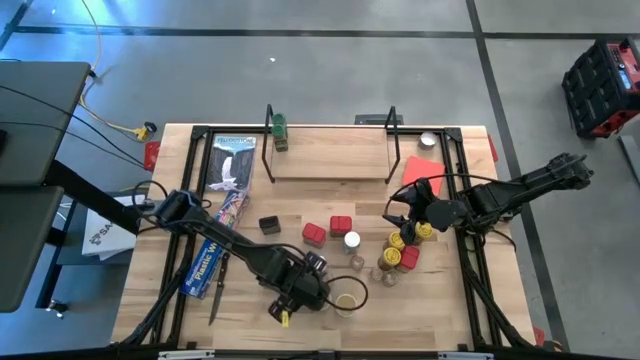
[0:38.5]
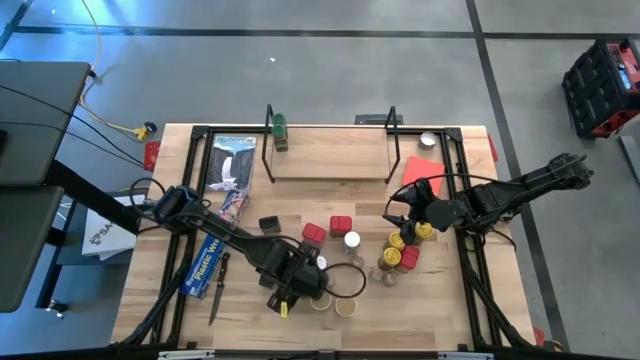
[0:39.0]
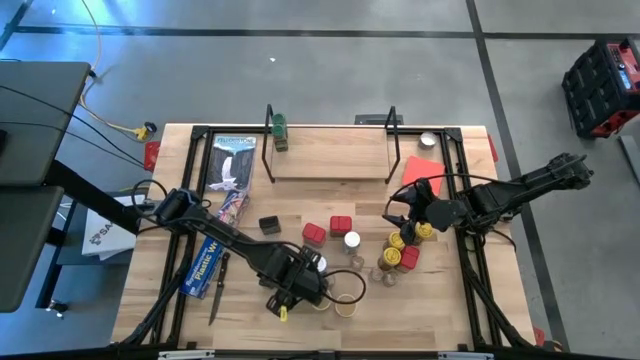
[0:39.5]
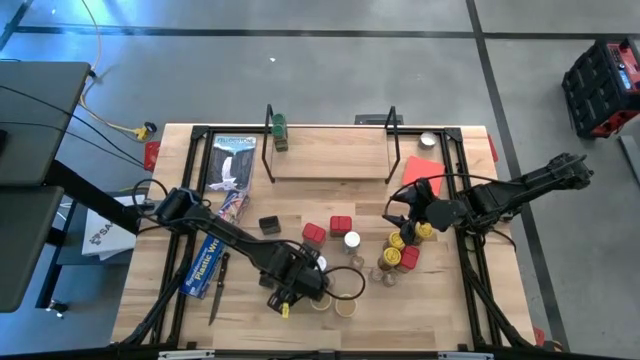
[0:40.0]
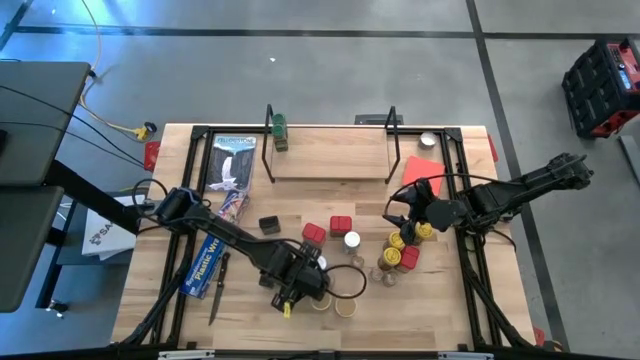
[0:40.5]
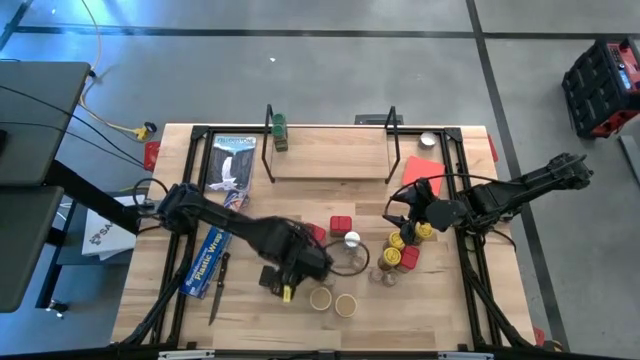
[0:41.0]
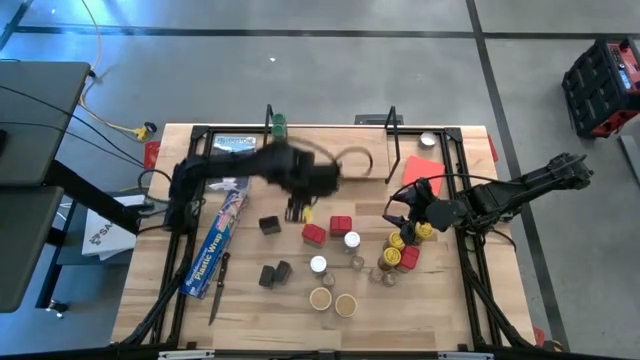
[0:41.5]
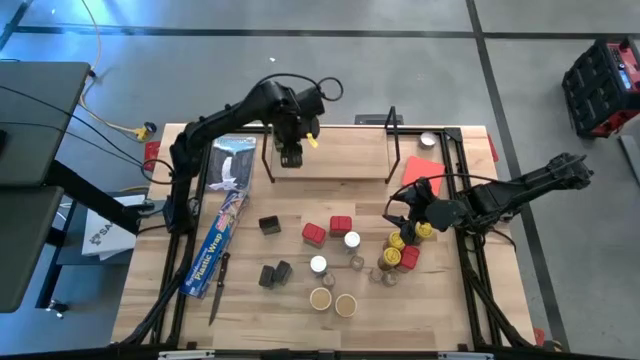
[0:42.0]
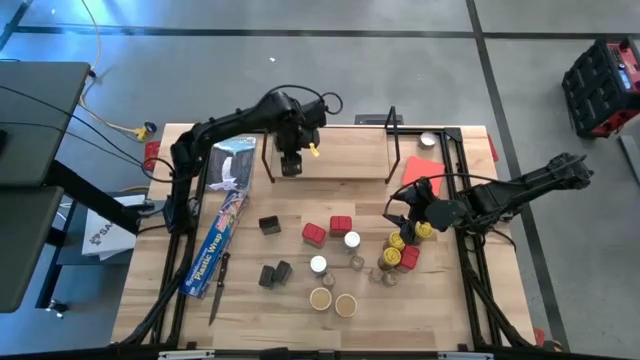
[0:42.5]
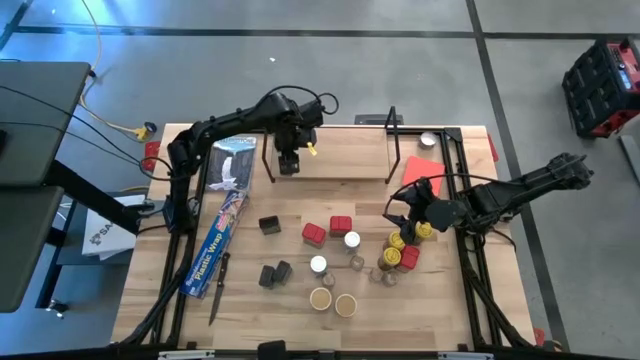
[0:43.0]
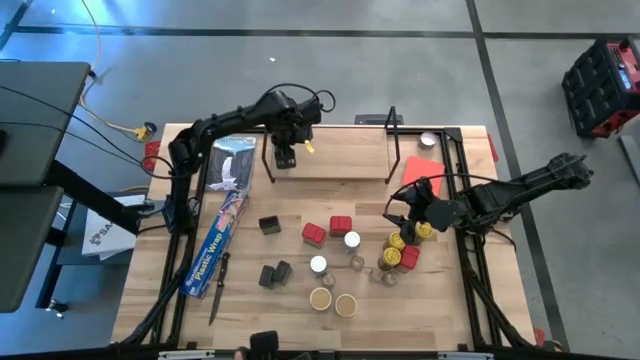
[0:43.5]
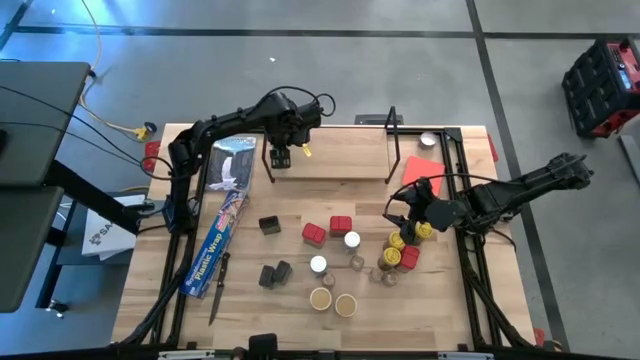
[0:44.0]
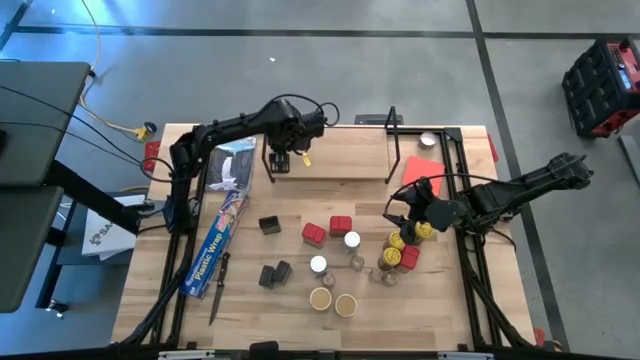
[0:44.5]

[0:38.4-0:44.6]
Task: Shelf spices
Put the green seasoning bottle on the shelf and align it with the other green seasoning bottles

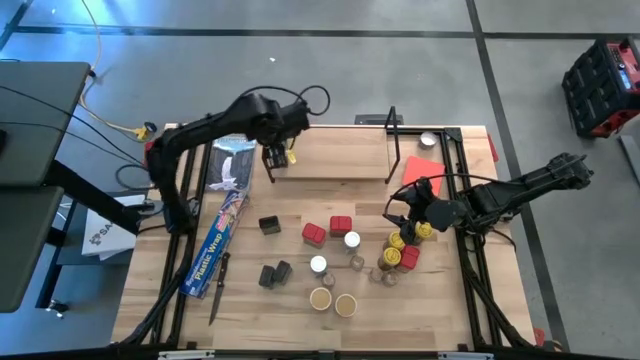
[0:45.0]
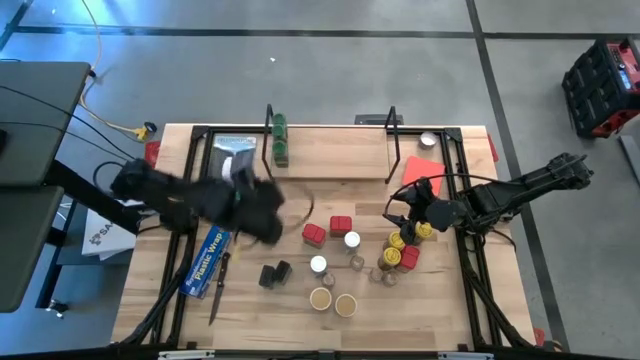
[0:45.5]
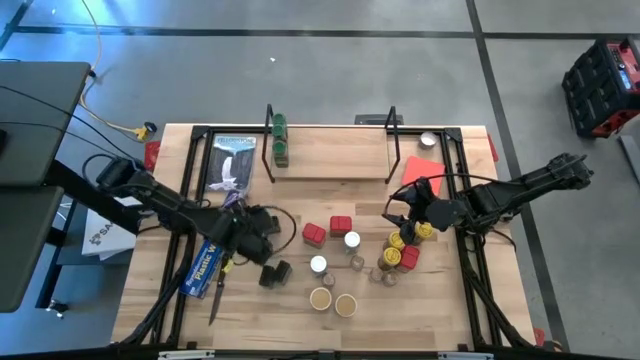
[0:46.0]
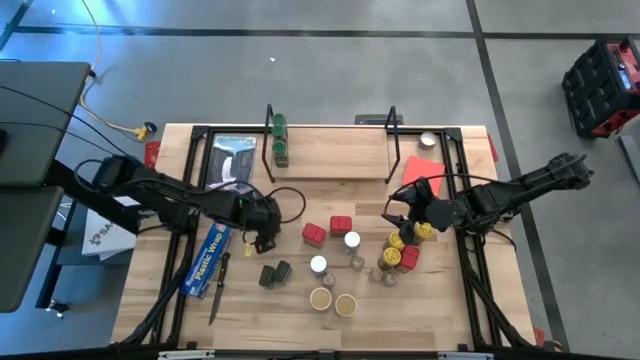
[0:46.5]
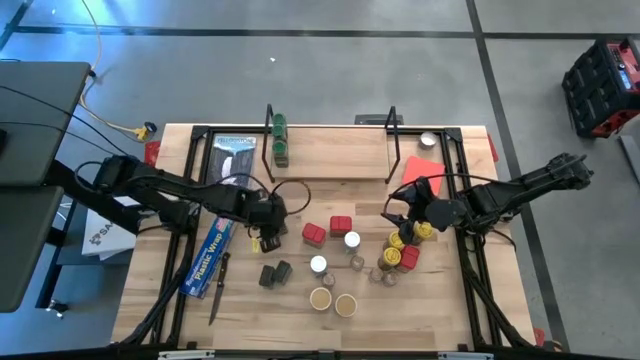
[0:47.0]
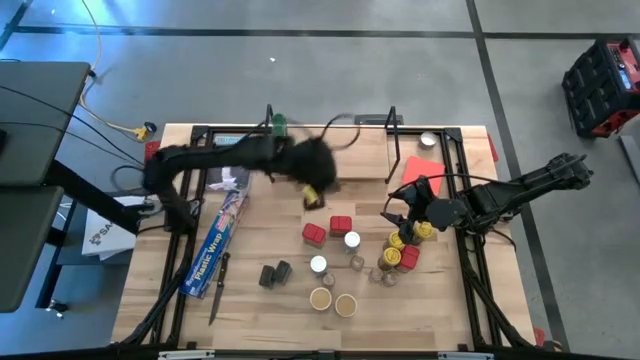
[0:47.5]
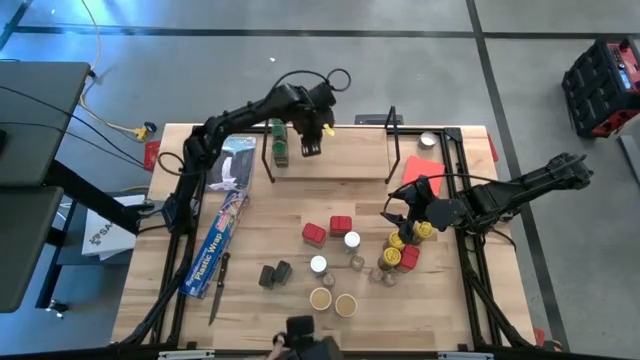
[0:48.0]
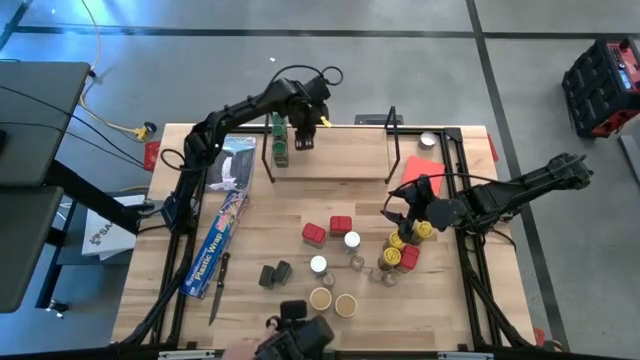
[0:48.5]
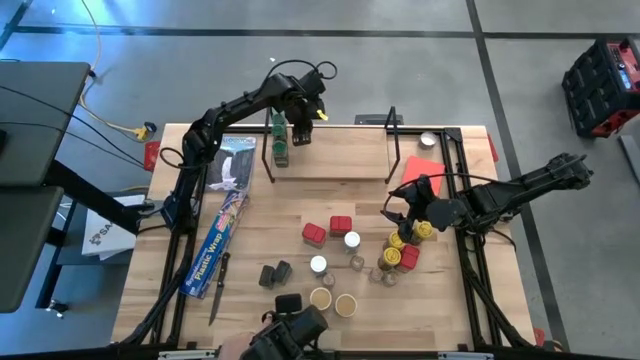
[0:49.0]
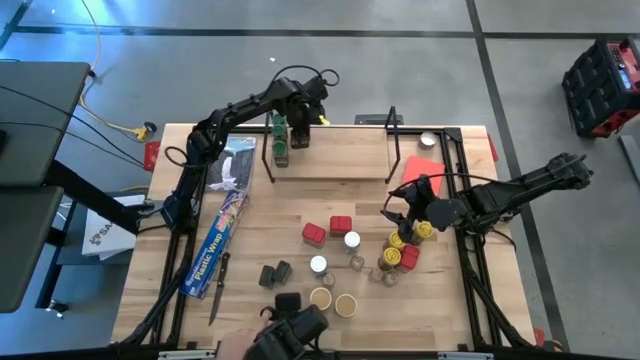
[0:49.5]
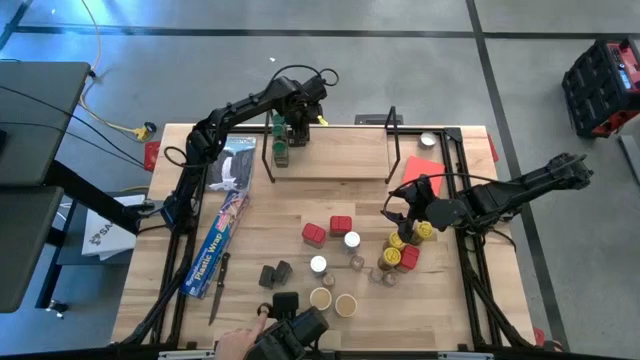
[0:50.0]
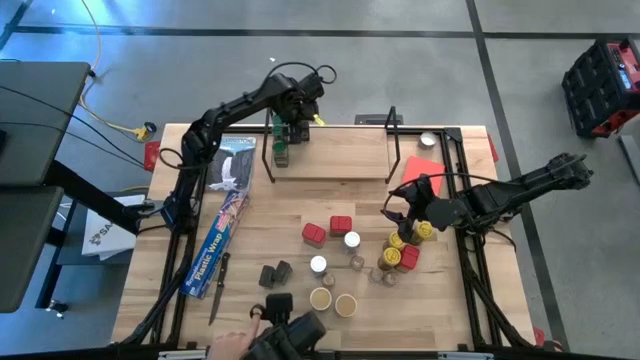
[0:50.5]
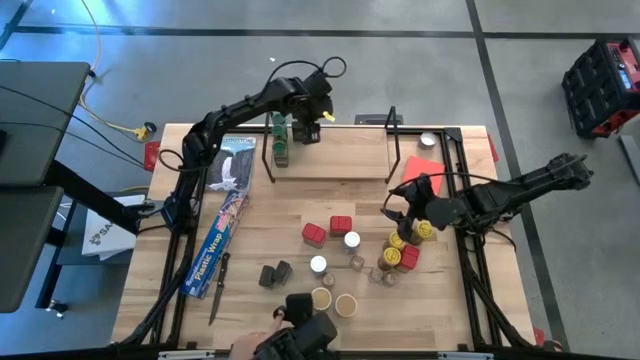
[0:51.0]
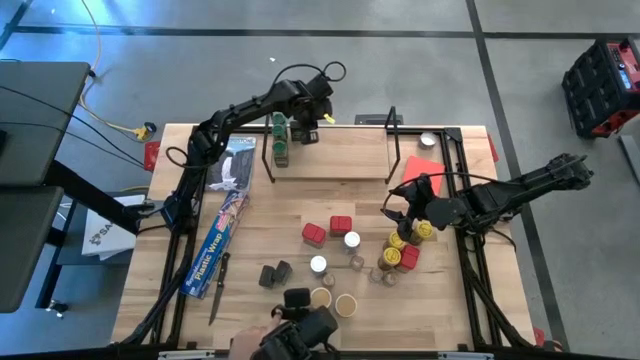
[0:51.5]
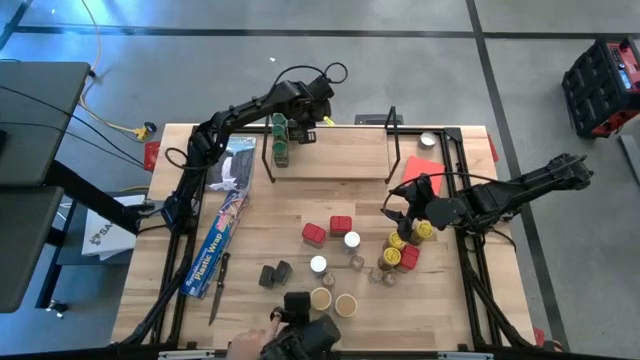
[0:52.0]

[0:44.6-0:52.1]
Put the black seasoning can on the shelf to the right of the top green seasoning bottle

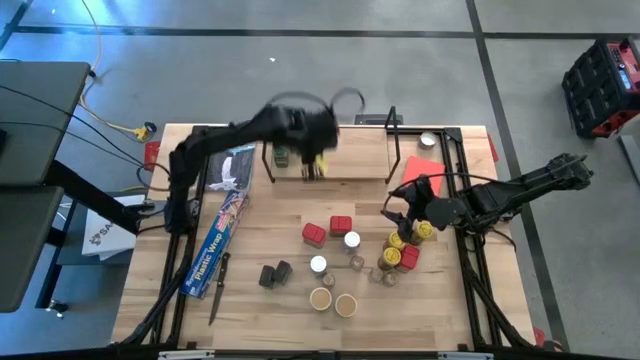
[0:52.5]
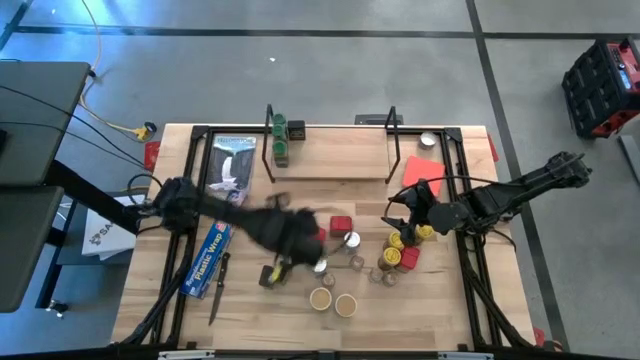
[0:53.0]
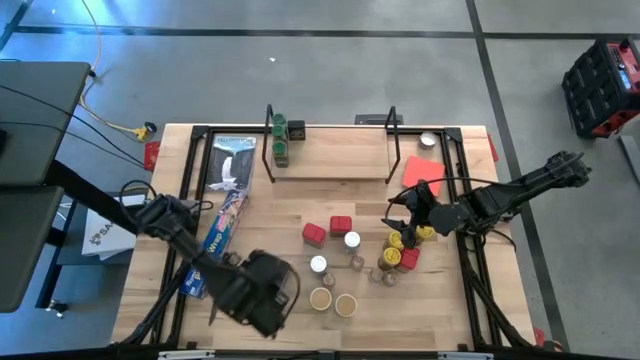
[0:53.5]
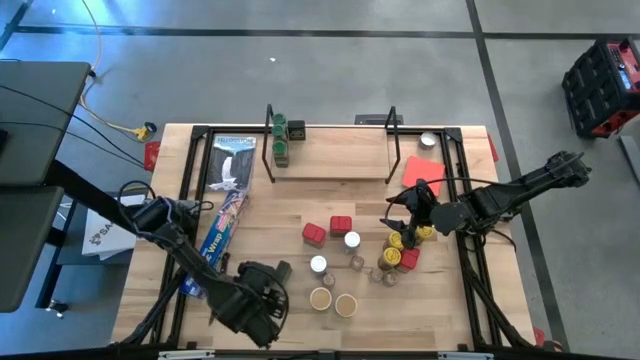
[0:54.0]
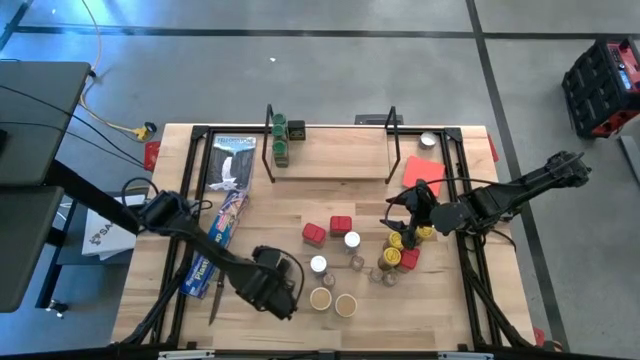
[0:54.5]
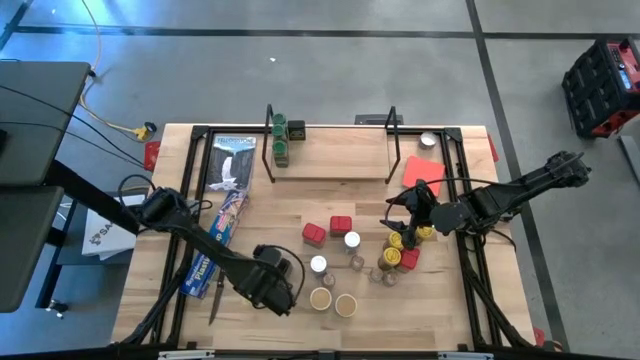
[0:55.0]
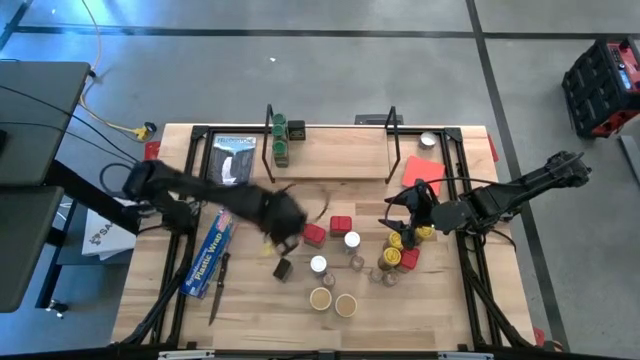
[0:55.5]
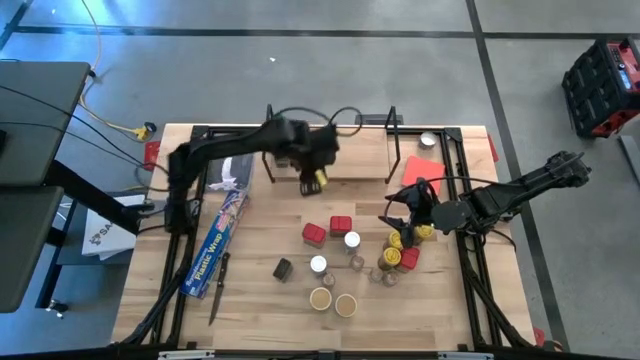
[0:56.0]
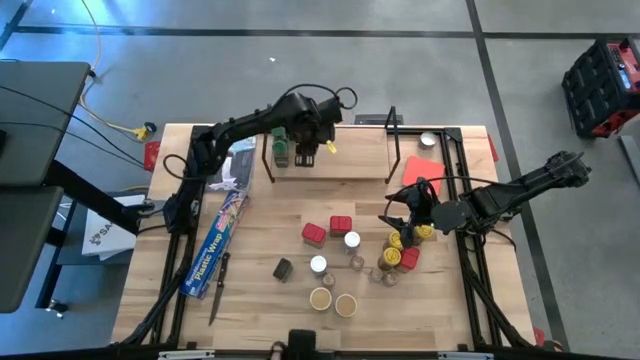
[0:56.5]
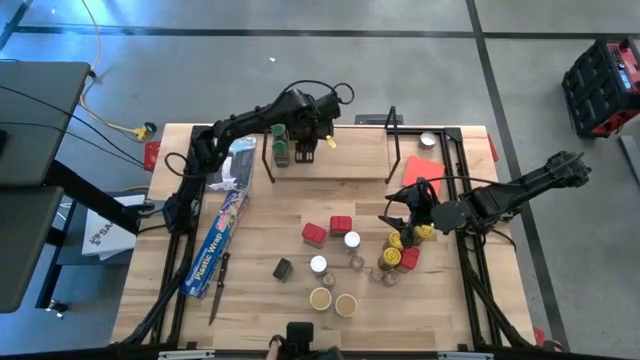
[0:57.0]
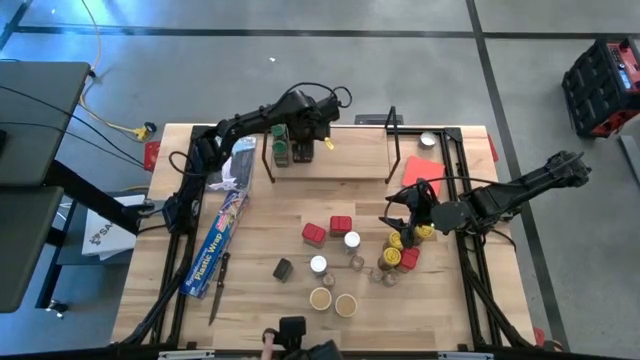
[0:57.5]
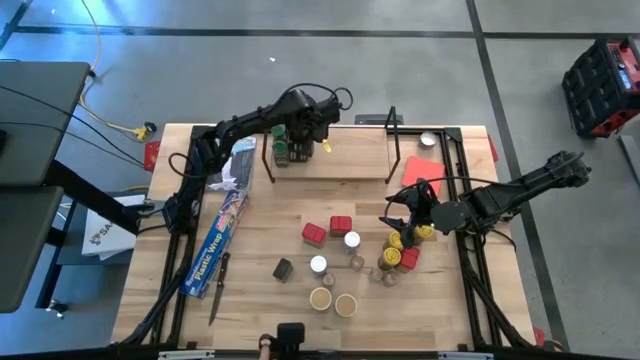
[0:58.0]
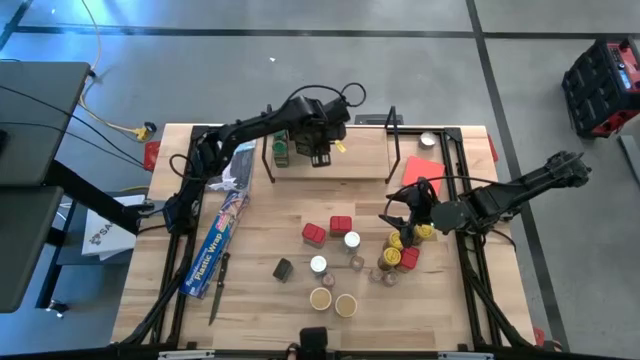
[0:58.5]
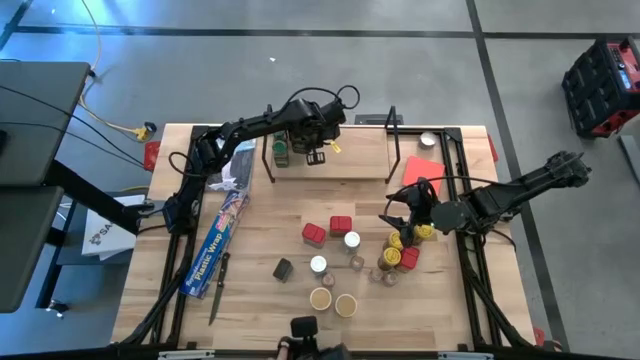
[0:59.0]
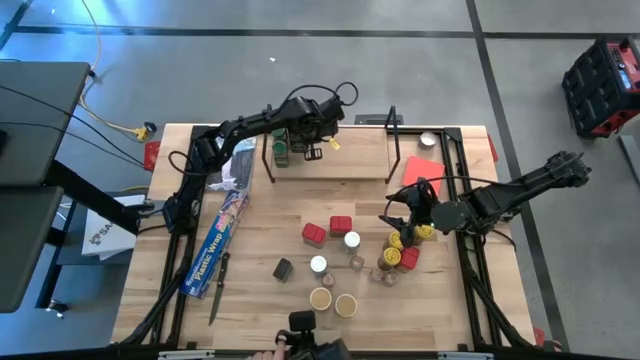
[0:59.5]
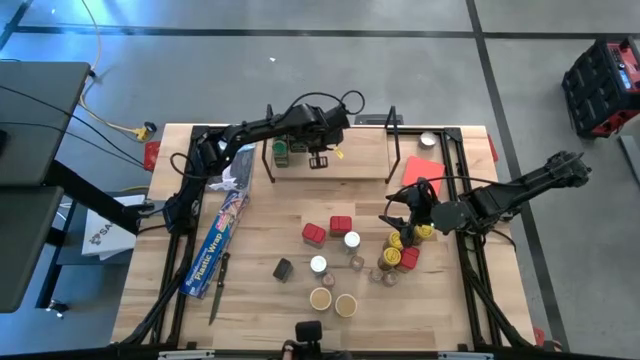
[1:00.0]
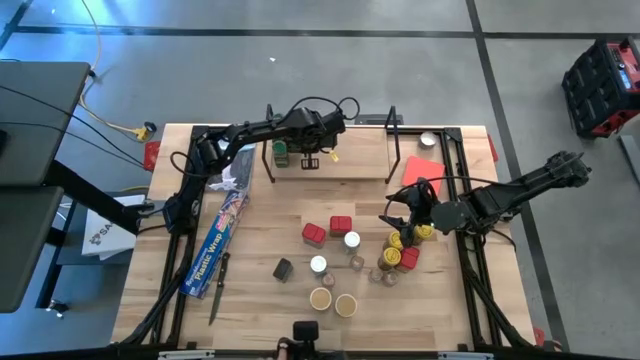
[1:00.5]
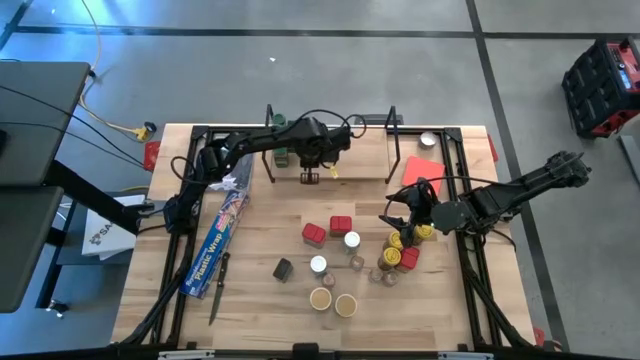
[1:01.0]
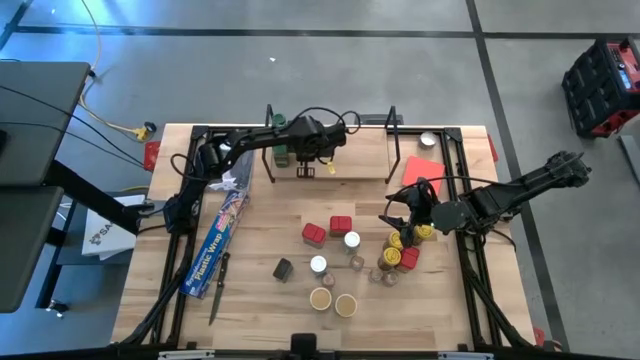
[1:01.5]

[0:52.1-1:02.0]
Put the black seasoning can on the shelf and align it with the other black seasoning can
